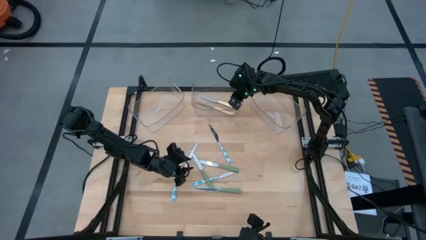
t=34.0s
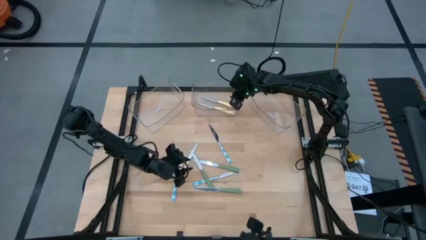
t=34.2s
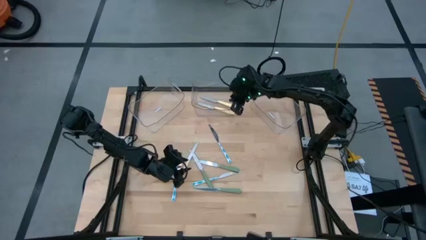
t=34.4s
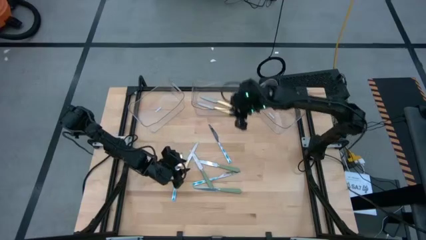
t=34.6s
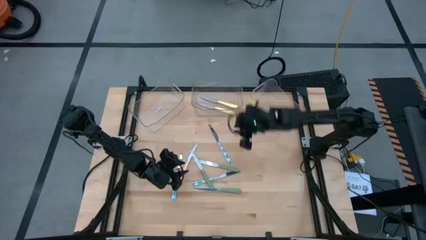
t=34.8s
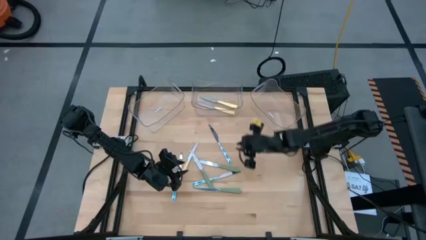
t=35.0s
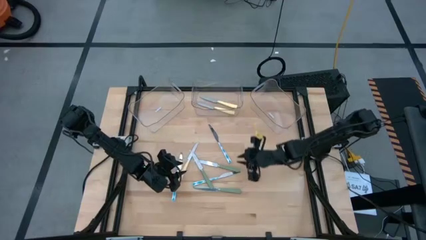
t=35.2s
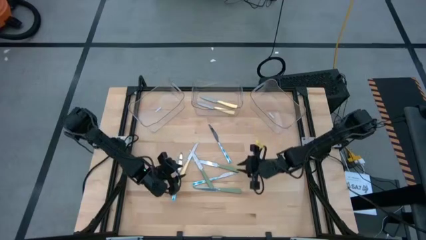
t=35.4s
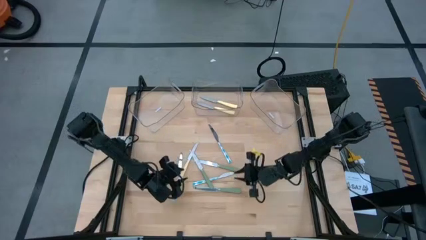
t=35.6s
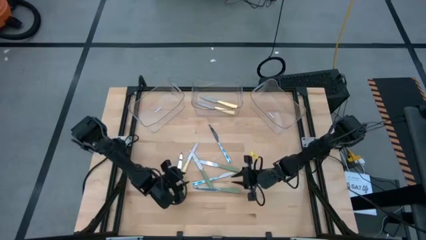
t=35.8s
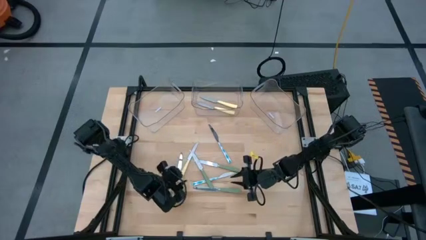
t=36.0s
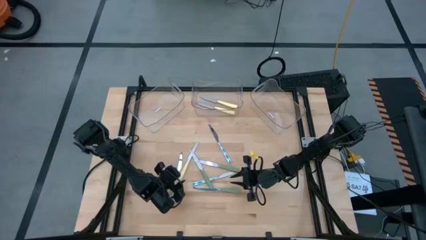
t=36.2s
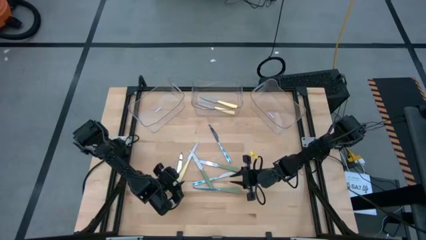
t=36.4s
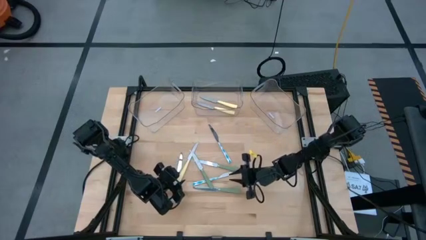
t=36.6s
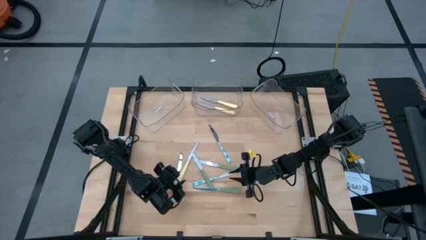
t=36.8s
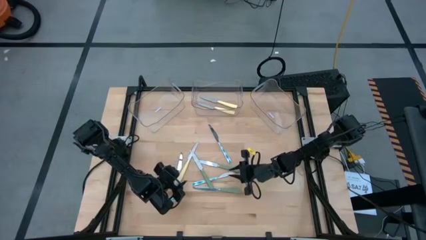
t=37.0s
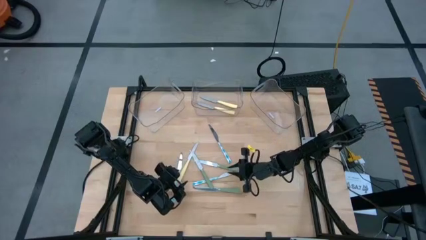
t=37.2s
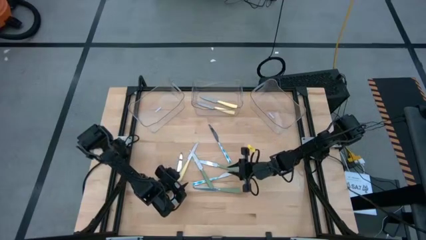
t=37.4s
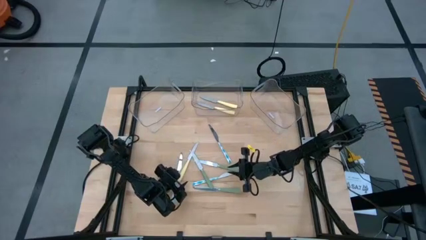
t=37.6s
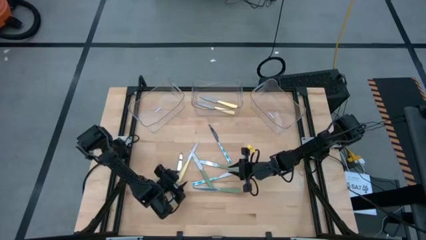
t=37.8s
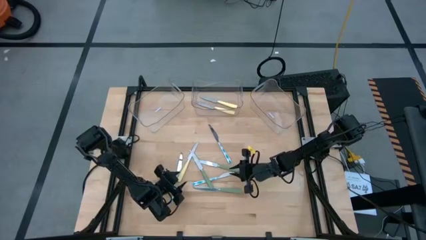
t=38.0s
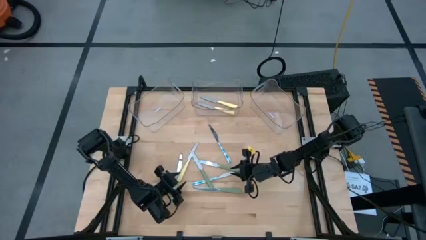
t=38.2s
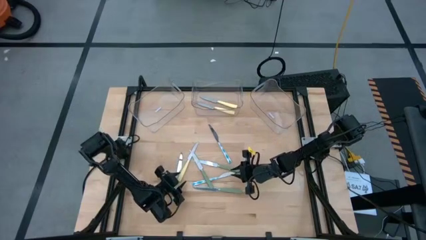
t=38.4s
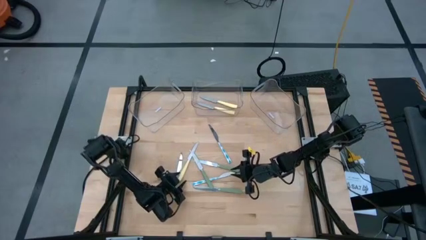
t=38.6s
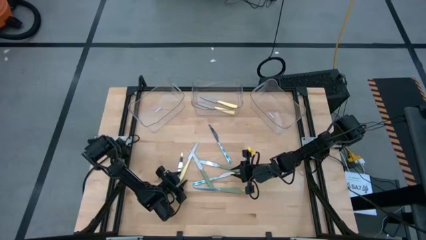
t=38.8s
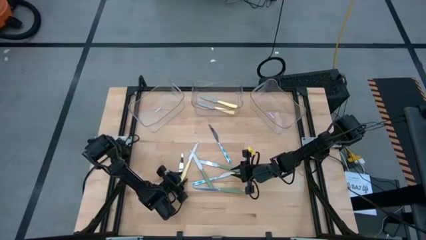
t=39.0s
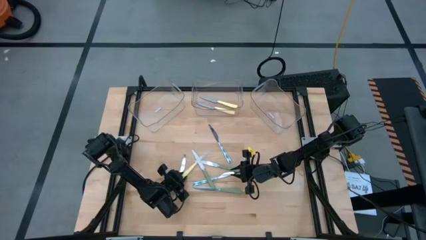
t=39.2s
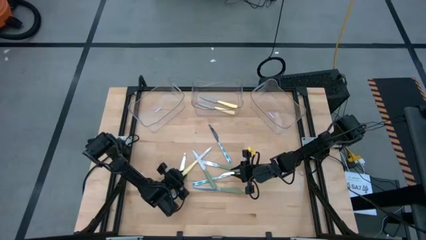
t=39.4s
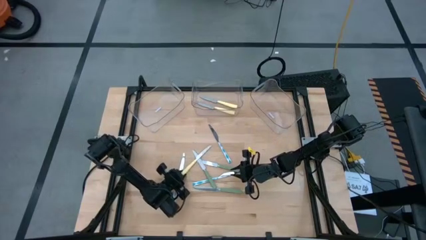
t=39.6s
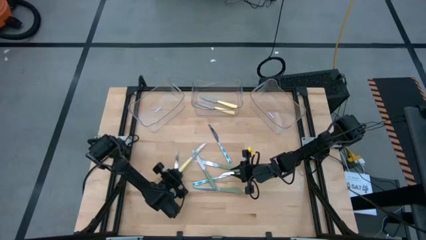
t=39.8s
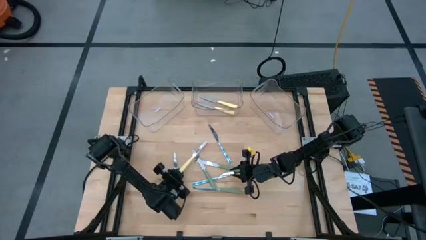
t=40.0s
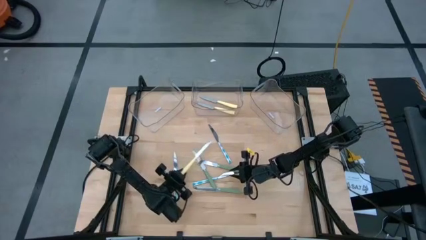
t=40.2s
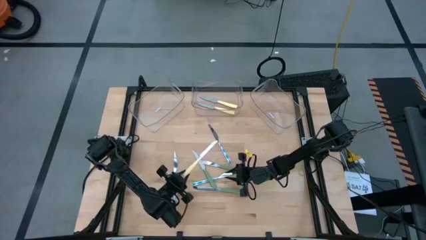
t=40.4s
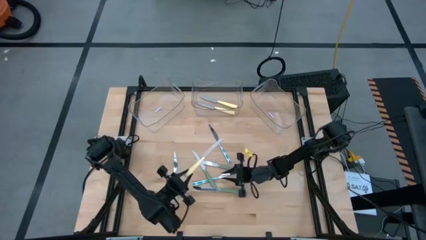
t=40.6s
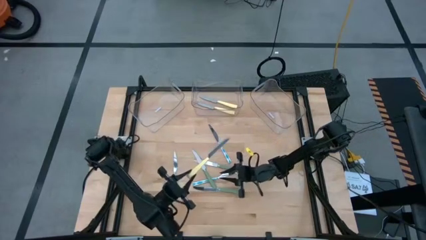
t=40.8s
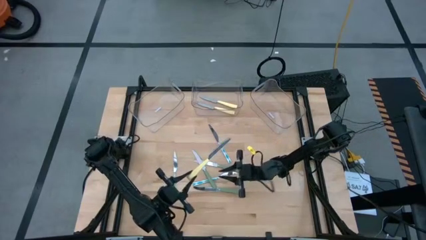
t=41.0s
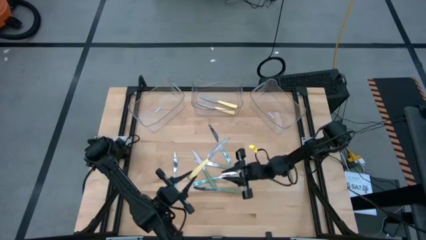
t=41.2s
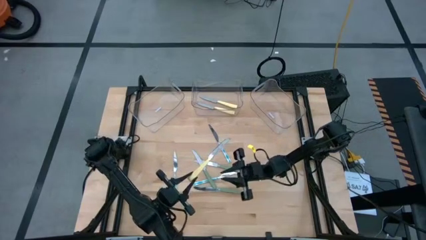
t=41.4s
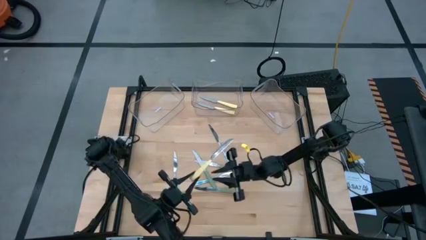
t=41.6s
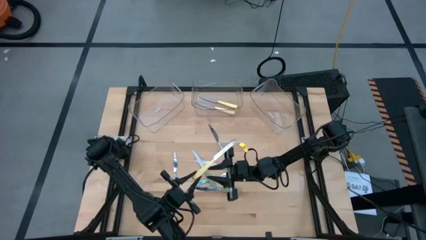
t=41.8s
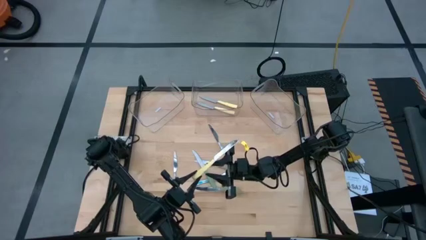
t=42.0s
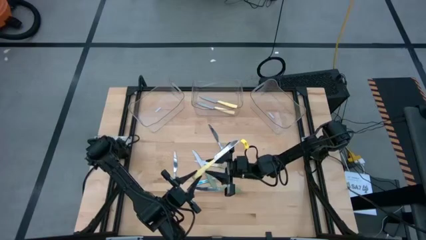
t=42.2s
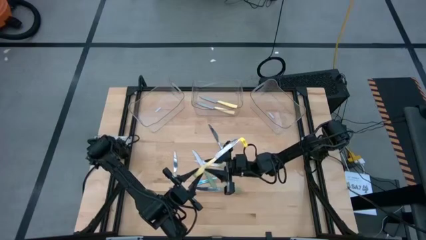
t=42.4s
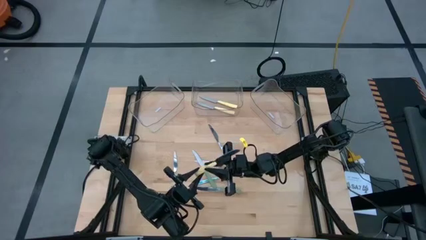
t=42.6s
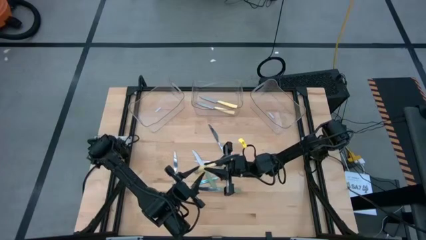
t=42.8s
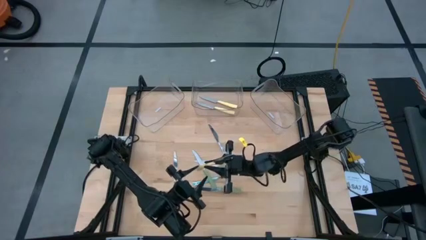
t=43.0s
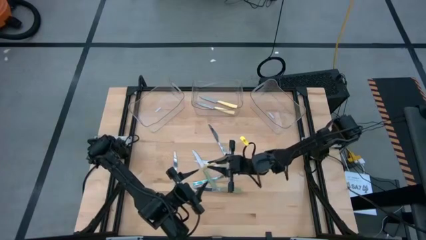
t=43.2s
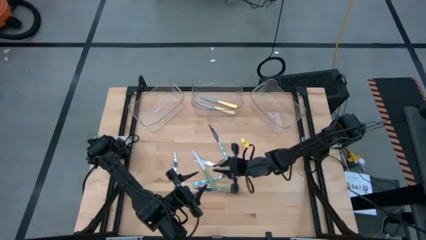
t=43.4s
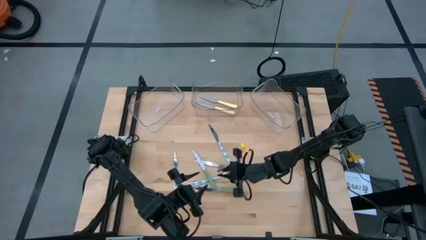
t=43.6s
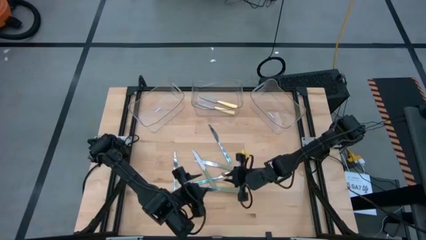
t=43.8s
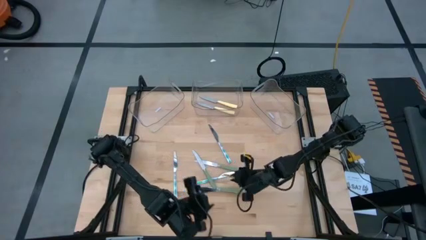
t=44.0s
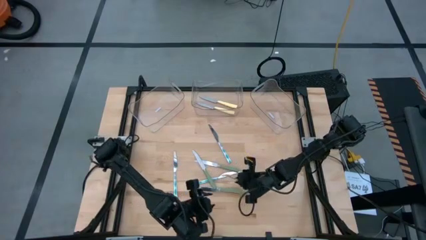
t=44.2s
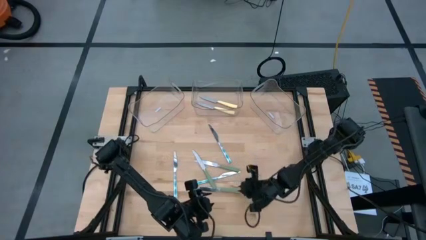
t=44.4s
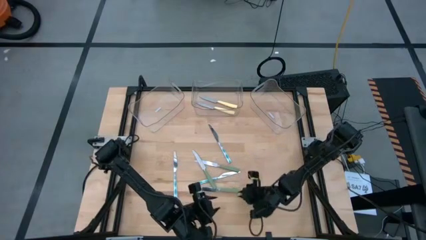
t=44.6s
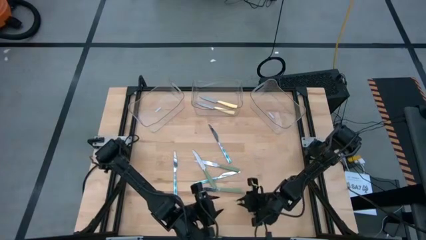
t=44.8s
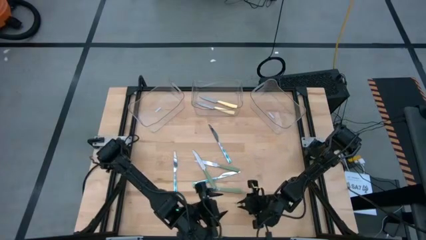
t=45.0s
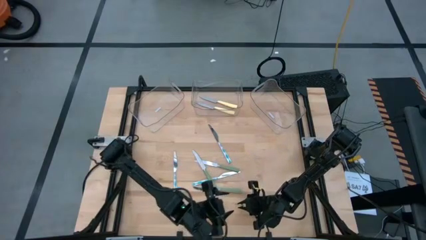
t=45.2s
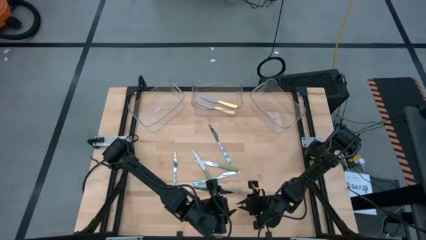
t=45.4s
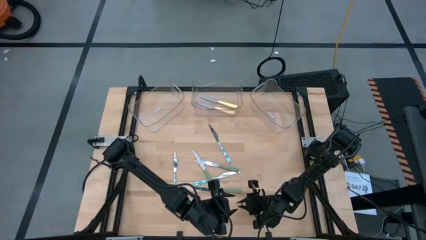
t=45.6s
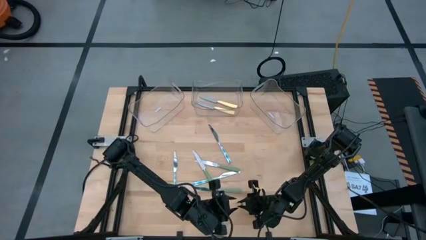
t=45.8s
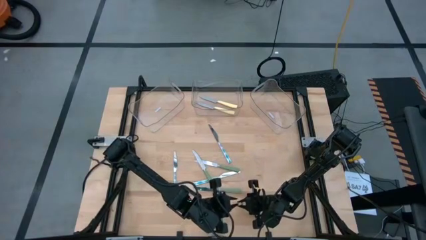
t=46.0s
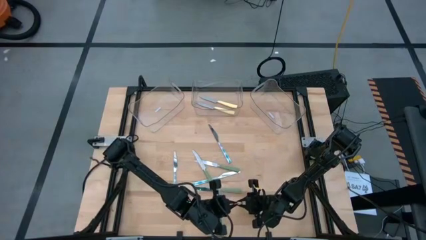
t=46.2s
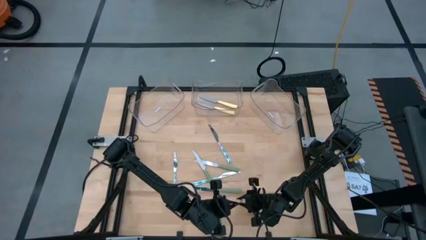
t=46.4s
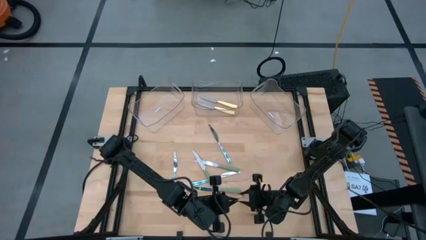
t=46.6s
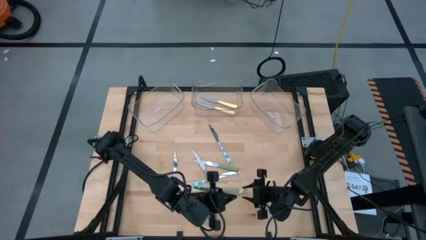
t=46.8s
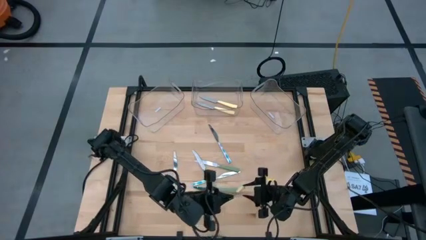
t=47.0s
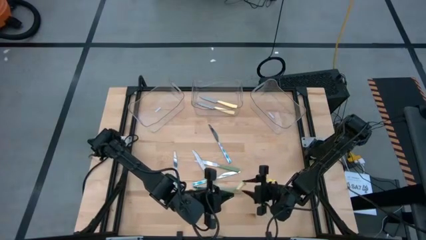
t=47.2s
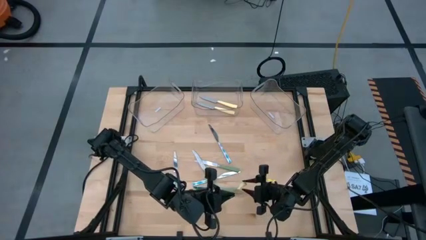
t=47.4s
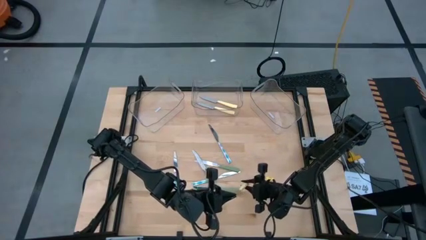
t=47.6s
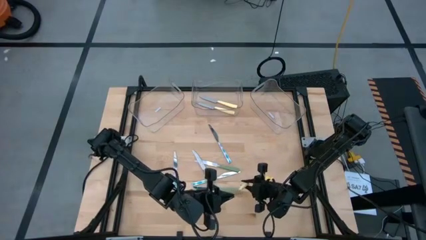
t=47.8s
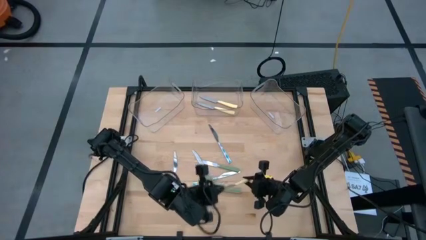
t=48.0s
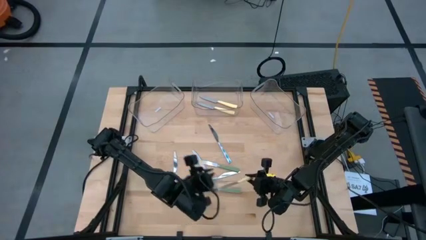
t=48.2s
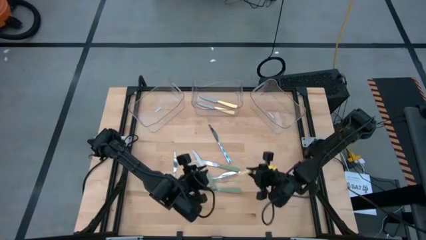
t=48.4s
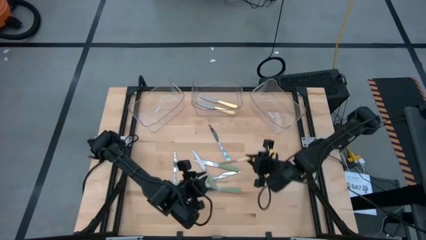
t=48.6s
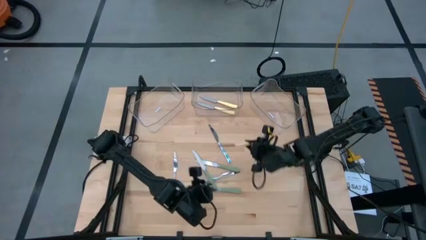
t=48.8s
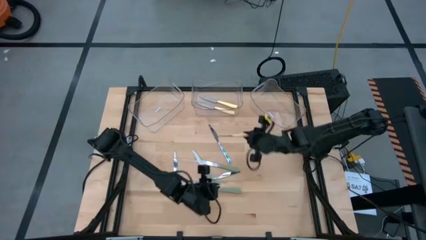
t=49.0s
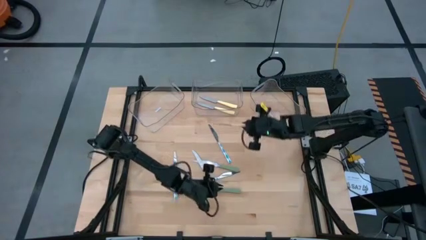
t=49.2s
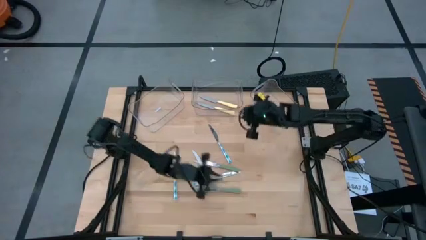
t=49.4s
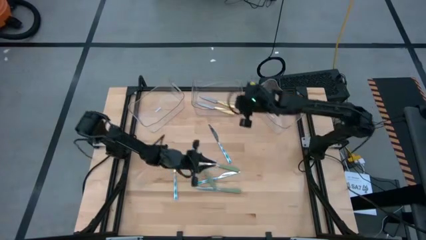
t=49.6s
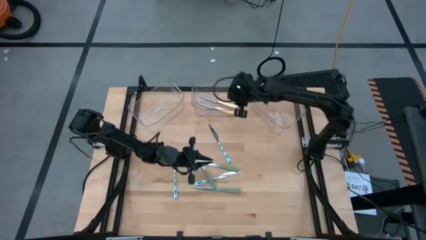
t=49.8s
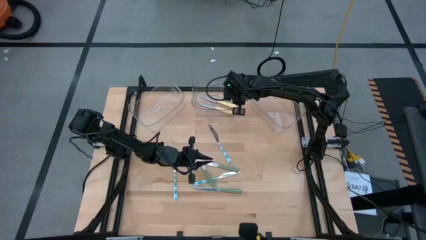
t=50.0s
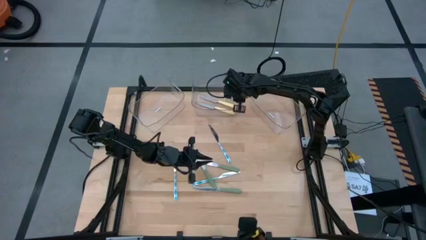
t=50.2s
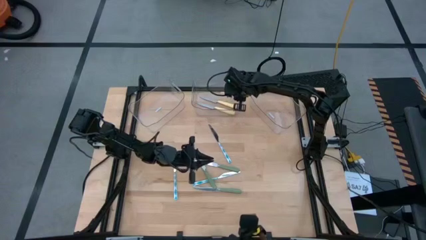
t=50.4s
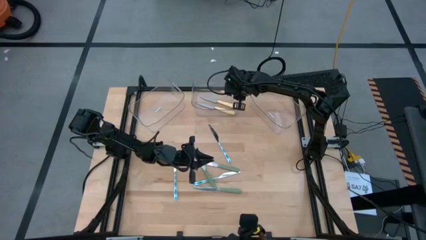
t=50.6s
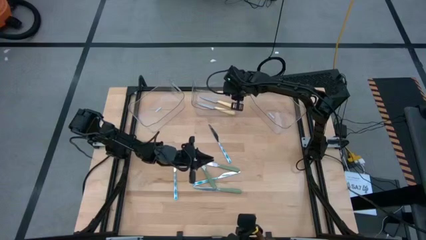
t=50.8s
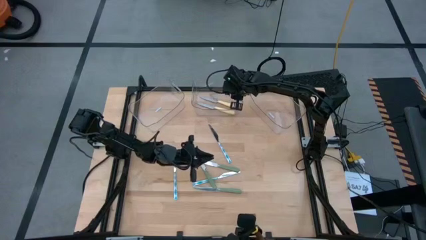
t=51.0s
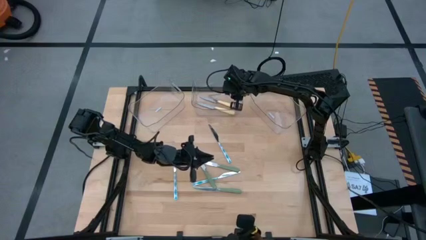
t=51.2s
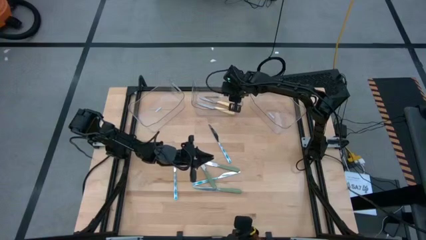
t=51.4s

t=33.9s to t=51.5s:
Task: Sort silverware by color (type)
Put the yellow table knife into the center transparent bin
